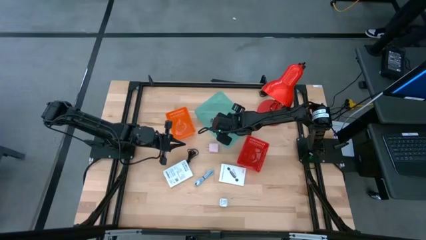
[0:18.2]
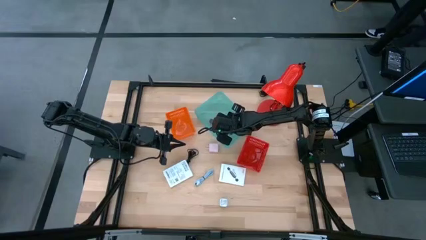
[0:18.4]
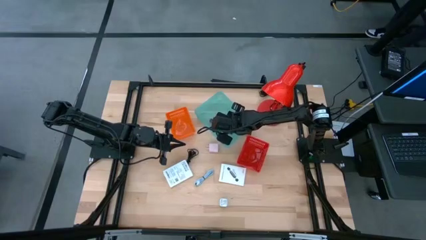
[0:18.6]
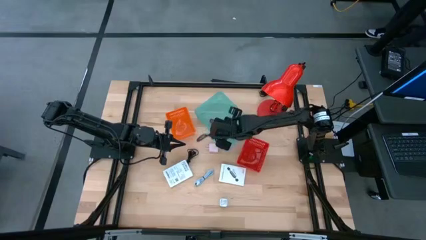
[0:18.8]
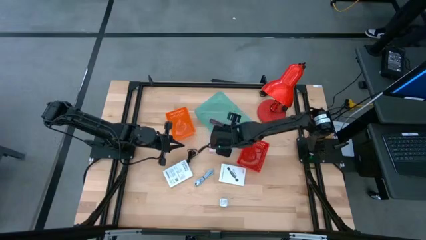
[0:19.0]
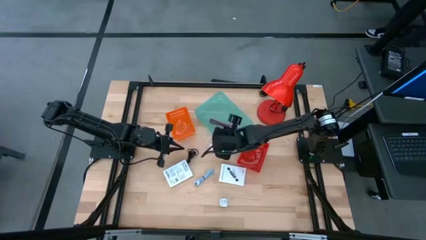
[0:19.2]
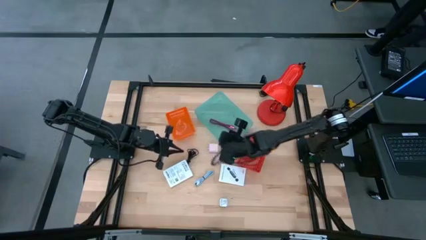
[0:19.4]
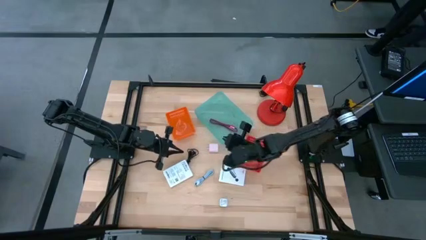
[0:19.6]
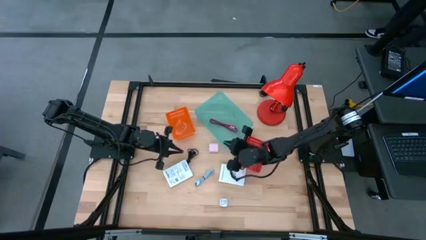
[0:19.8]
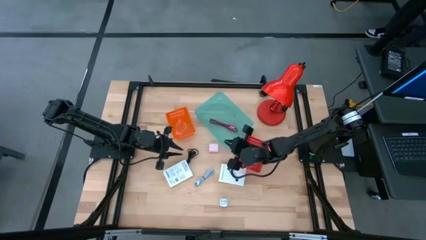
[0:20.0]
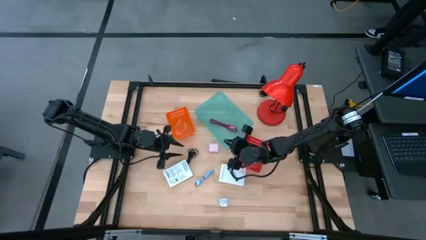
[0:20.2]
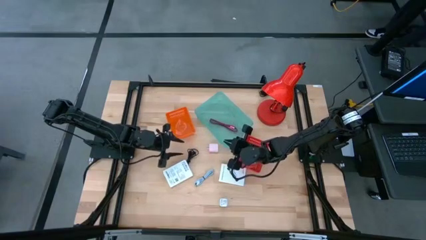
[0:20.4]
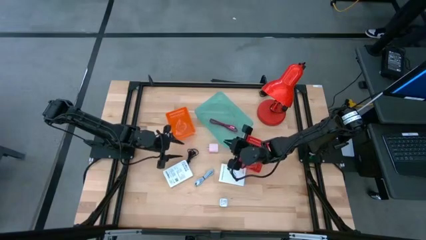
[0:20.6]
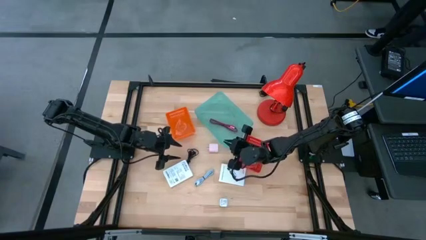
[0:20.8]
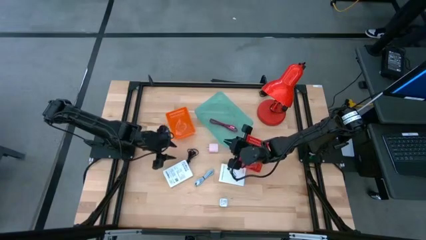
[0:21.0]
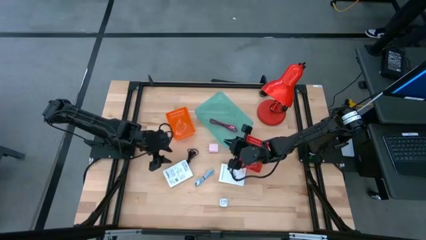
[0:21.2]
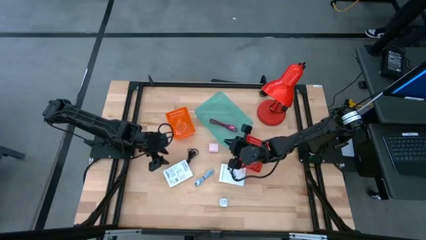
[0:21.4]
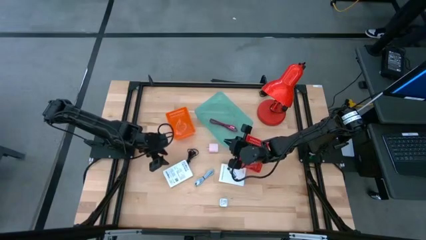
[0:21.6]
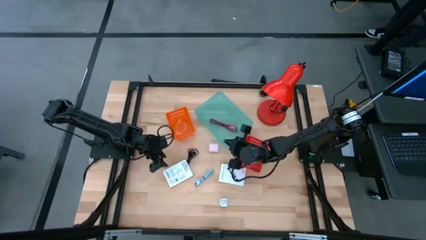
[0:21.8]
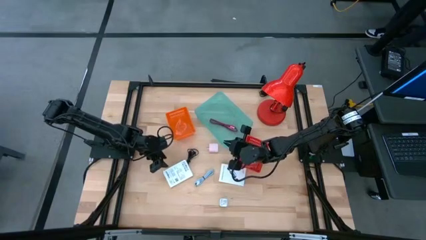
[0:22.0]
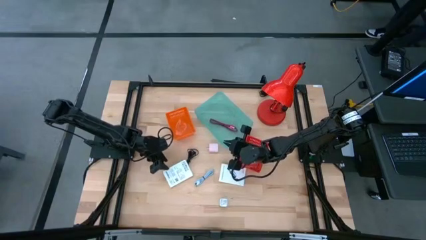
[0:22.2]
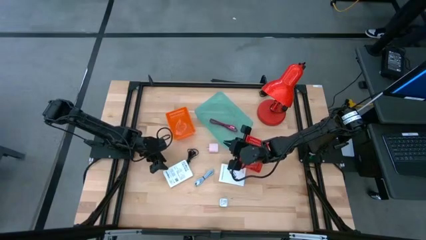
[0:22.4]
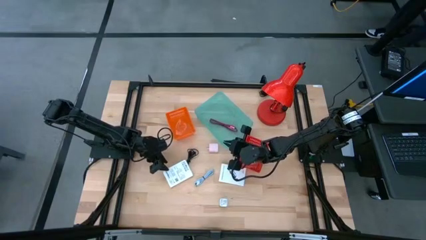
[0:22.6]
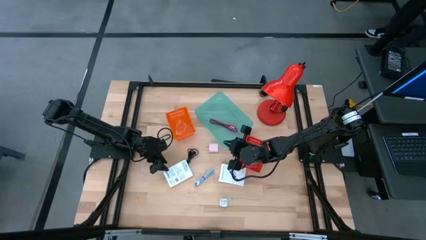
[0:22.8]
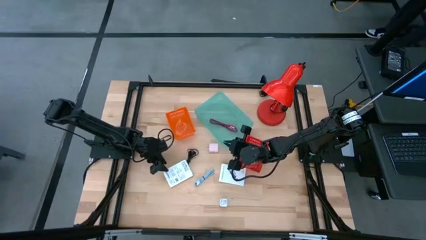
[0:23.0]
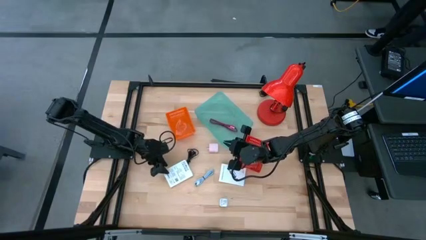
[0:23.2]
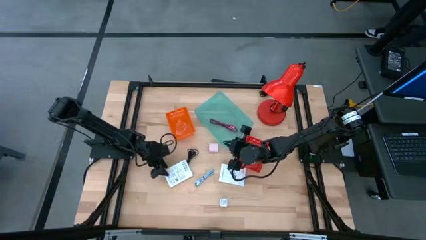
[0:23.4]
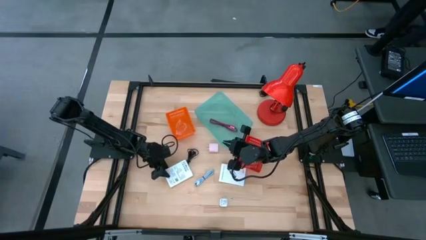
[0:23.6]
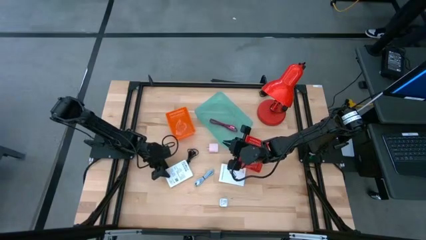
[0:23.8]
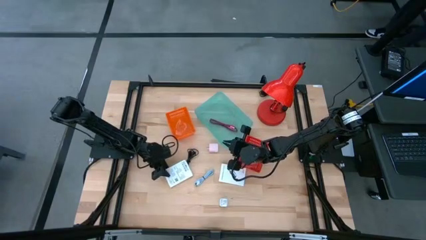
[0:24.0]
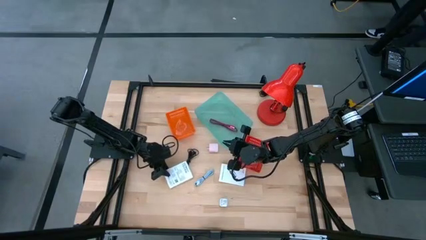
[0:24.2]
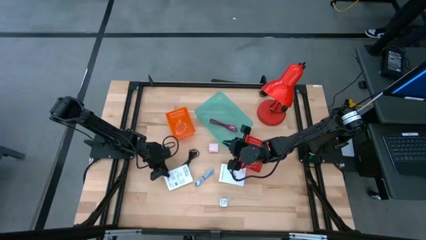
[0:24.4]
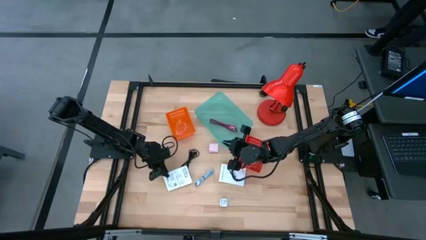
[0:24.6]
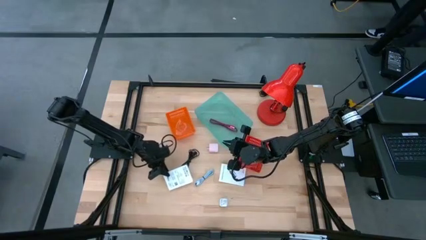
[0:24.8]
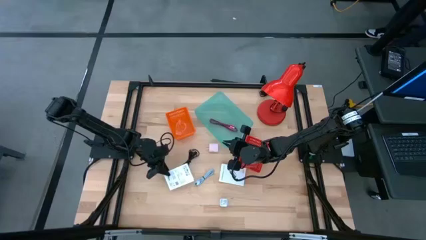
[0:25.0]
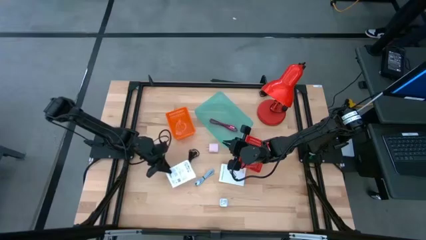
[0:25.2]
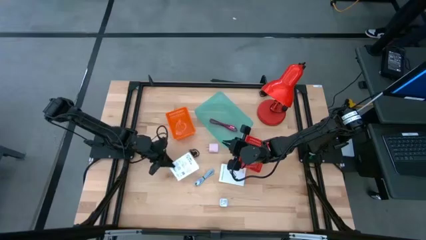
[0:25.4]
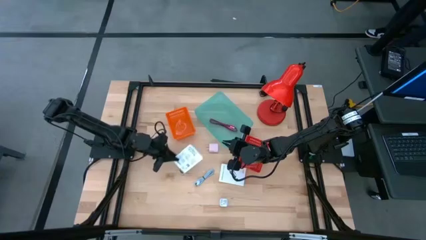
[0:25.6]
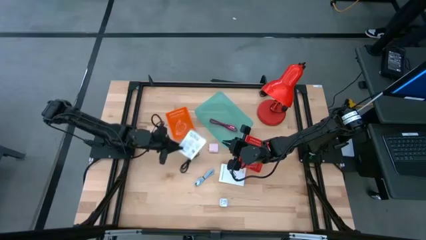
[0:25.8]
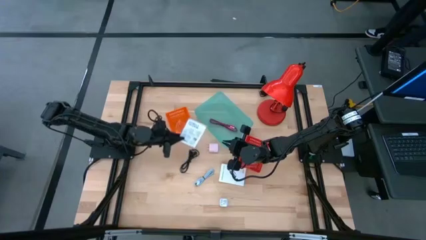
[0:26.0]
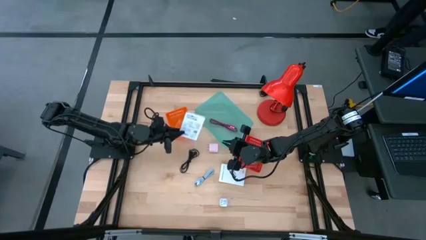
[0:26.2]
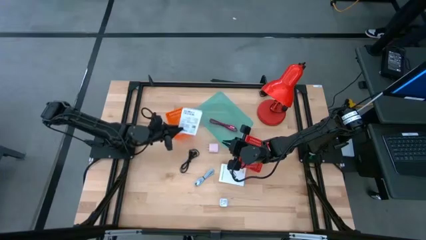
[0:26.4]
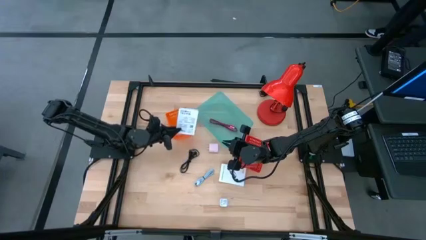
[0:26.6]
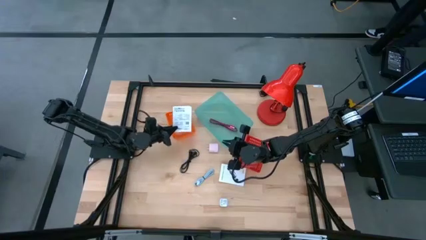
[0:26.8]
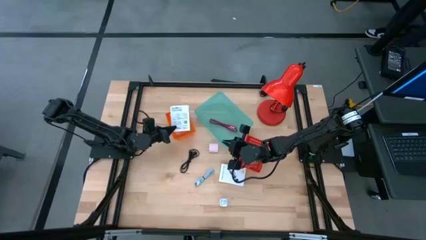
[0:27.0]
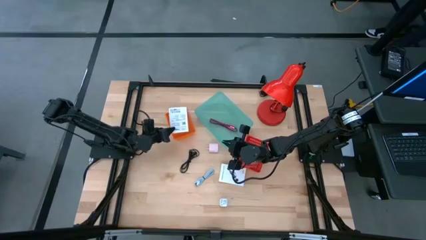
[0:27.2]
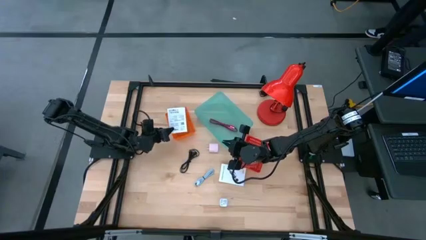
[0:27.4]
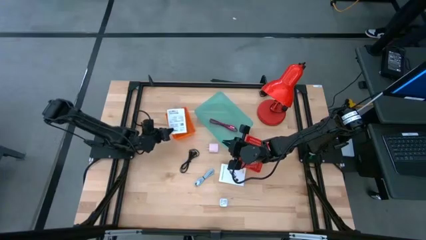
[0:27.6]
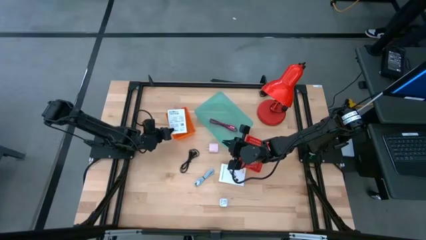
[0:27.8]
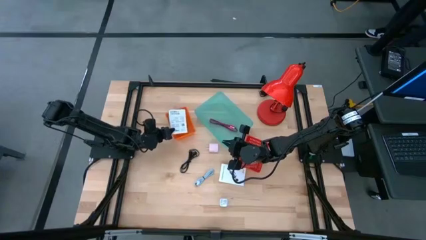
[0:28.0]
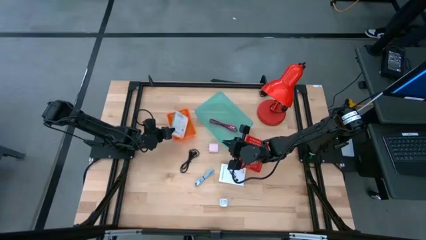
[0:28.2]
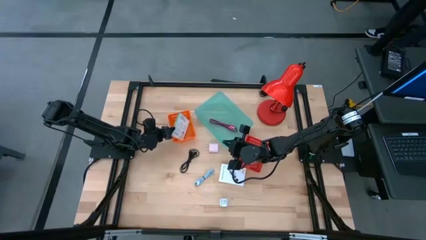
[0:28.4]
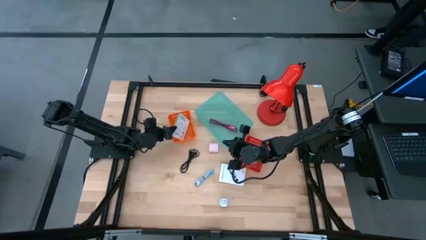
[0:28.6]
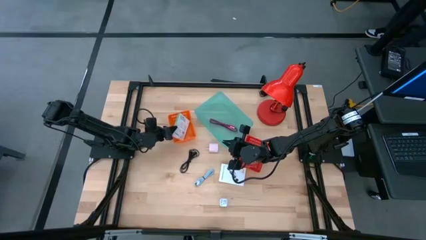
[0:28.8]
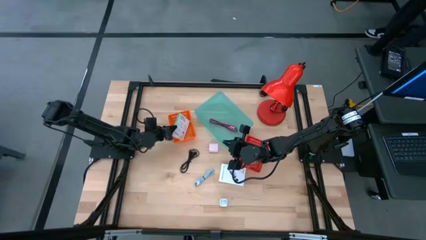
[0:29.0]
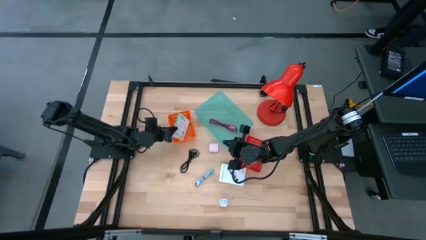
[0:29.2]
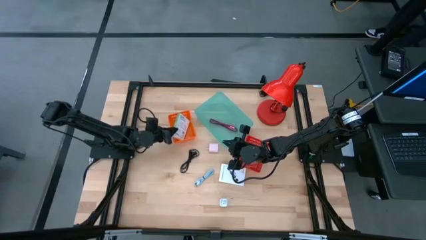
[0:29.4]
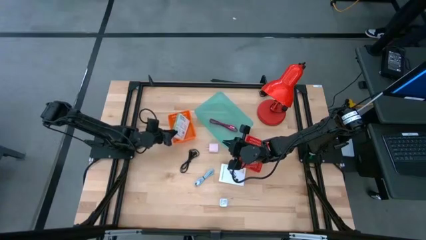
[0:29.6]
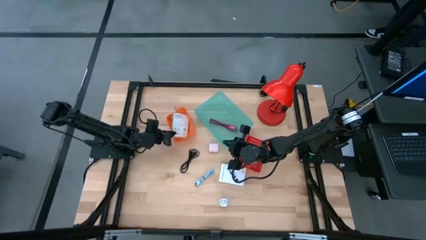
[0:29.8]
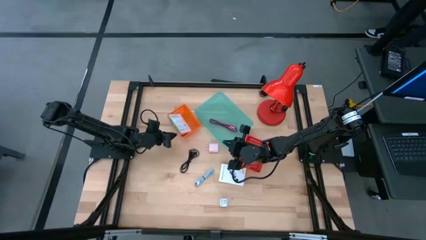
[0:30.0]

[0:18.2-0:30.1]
Task: Pick and place items into bin
Put the left white card reader box into the orange bin
